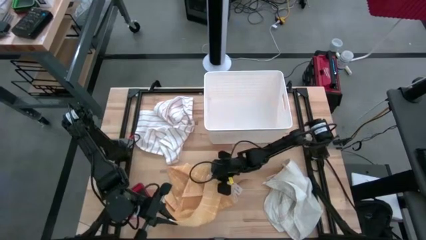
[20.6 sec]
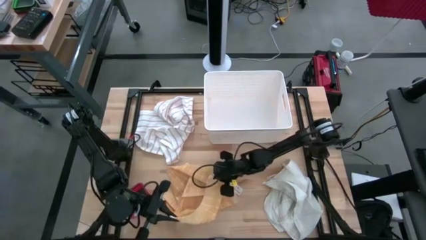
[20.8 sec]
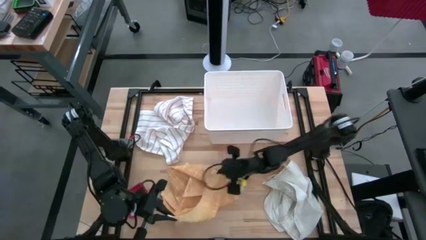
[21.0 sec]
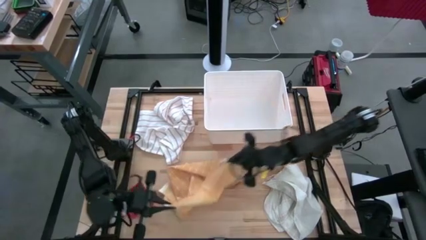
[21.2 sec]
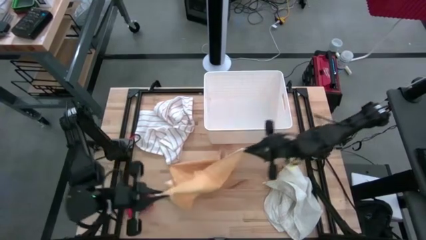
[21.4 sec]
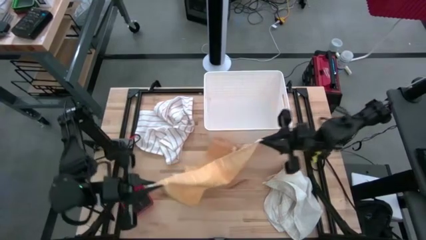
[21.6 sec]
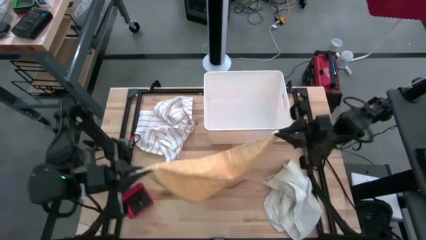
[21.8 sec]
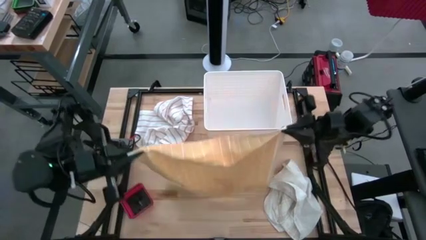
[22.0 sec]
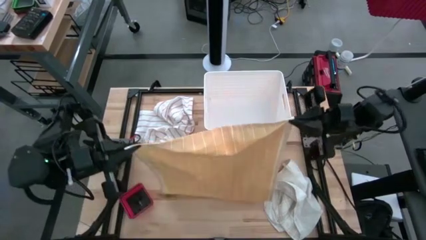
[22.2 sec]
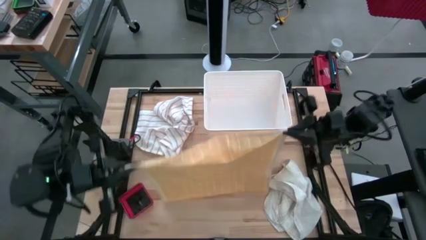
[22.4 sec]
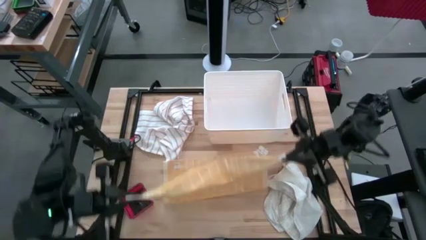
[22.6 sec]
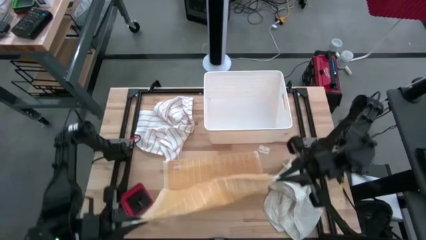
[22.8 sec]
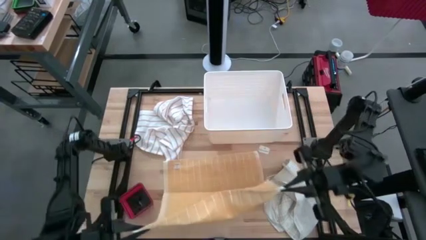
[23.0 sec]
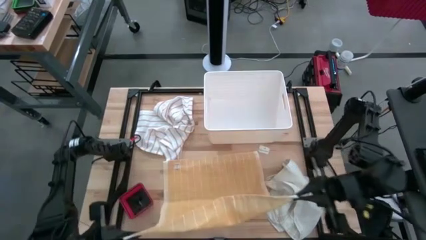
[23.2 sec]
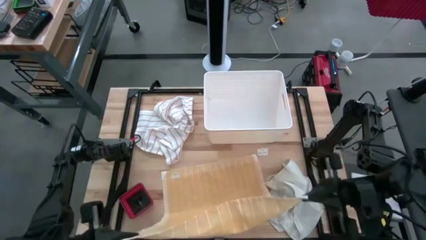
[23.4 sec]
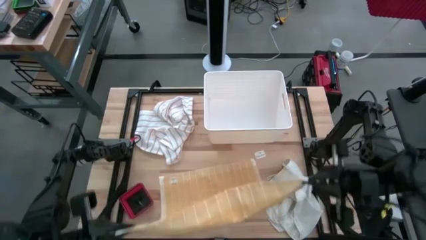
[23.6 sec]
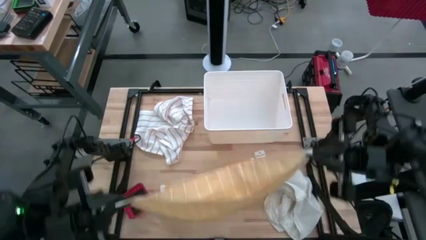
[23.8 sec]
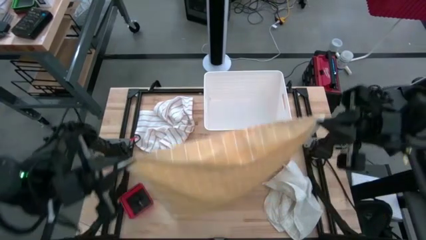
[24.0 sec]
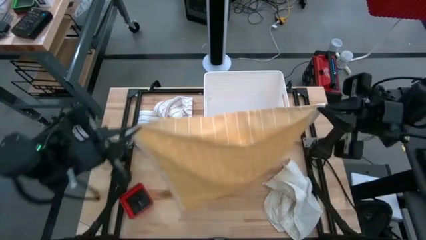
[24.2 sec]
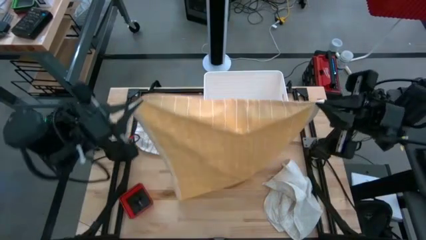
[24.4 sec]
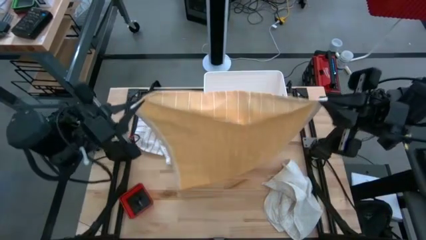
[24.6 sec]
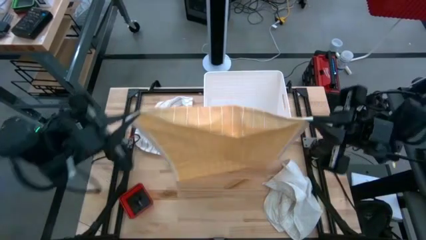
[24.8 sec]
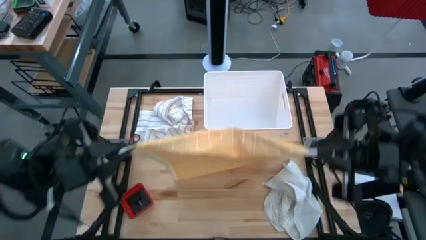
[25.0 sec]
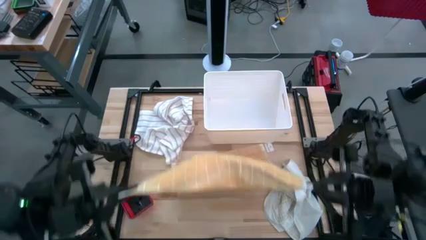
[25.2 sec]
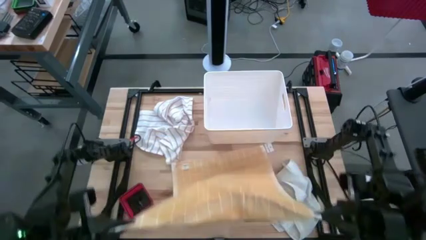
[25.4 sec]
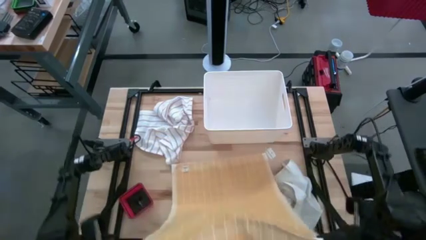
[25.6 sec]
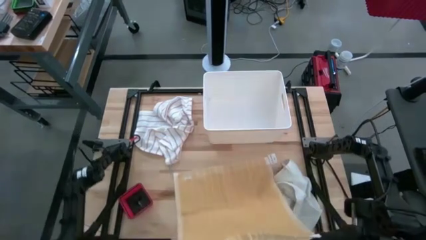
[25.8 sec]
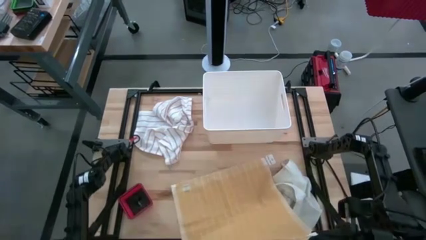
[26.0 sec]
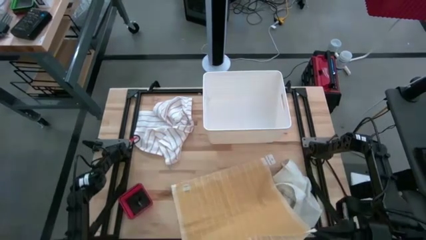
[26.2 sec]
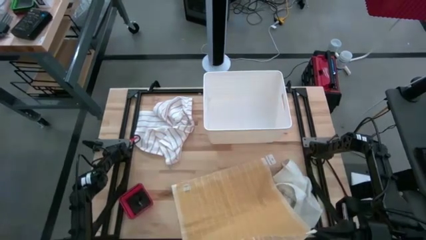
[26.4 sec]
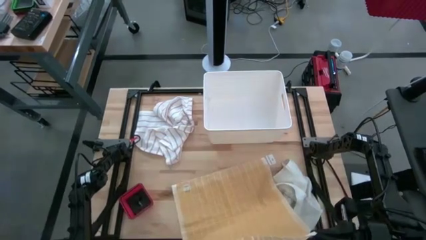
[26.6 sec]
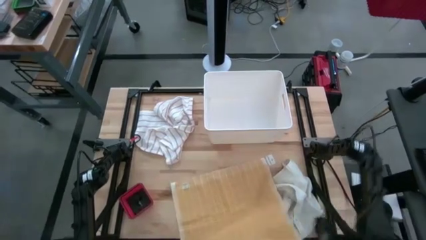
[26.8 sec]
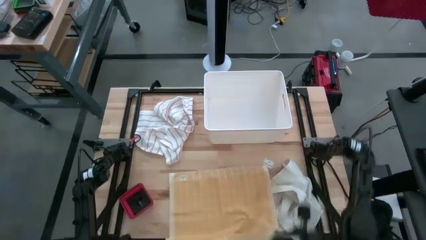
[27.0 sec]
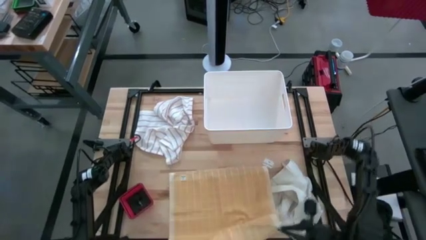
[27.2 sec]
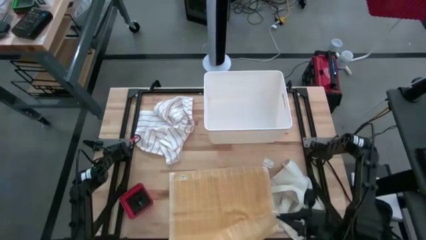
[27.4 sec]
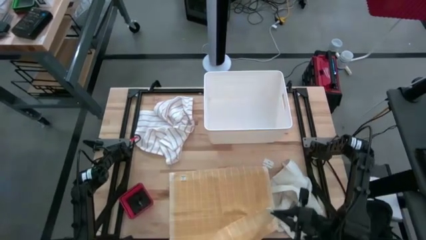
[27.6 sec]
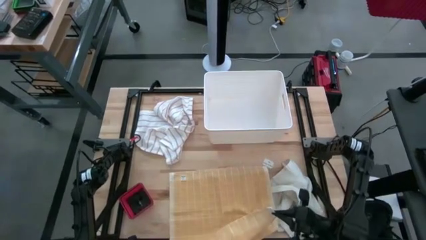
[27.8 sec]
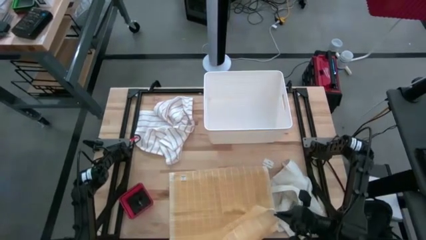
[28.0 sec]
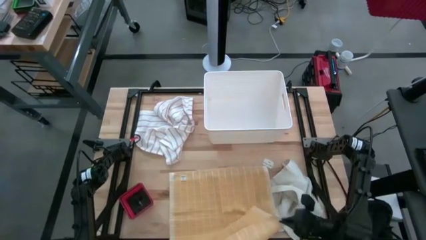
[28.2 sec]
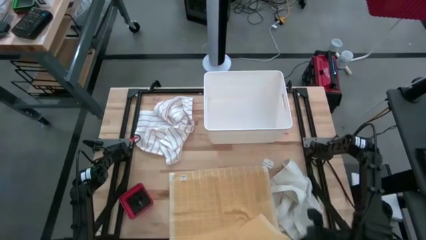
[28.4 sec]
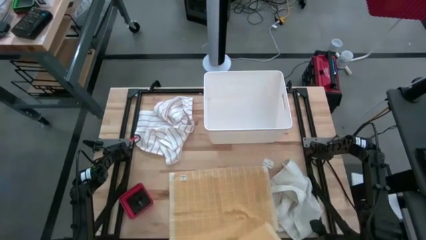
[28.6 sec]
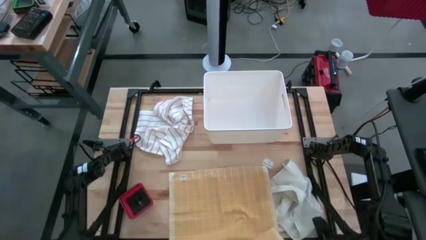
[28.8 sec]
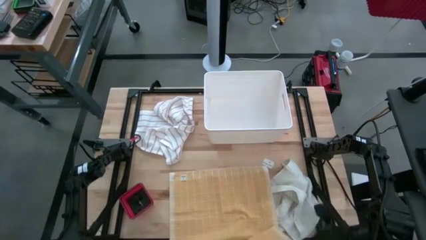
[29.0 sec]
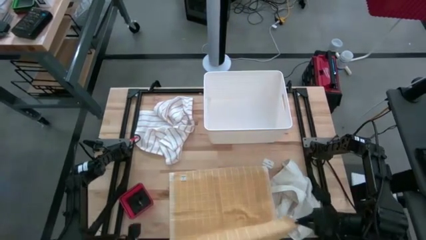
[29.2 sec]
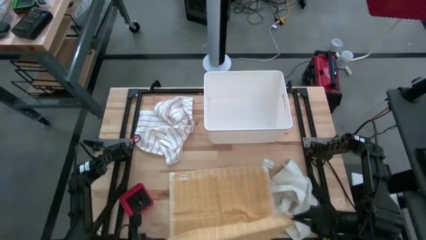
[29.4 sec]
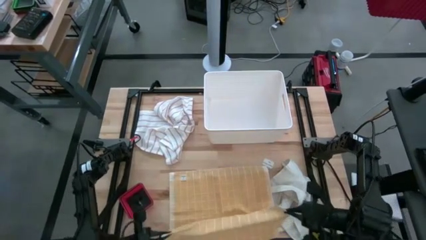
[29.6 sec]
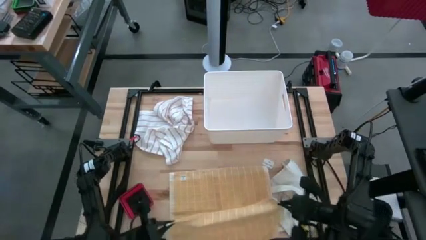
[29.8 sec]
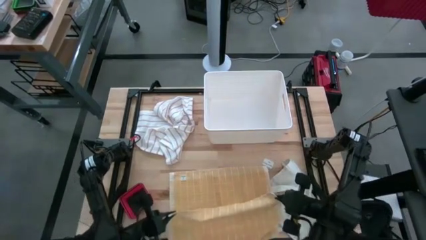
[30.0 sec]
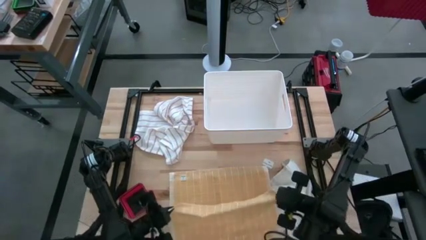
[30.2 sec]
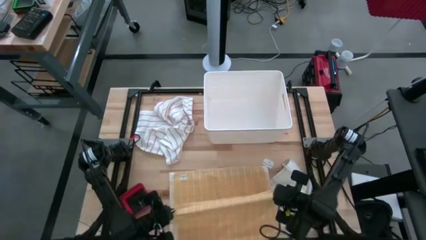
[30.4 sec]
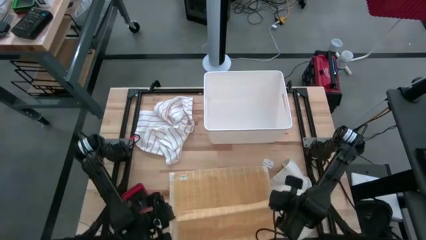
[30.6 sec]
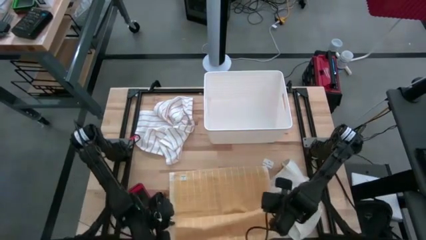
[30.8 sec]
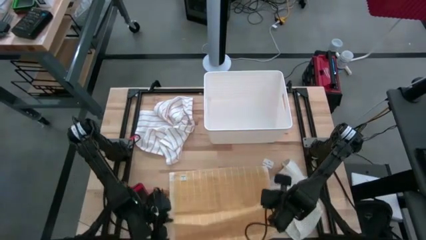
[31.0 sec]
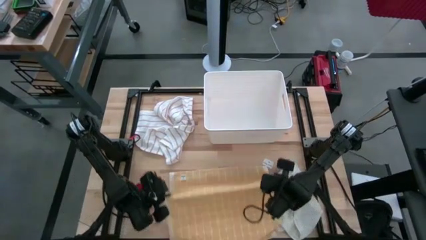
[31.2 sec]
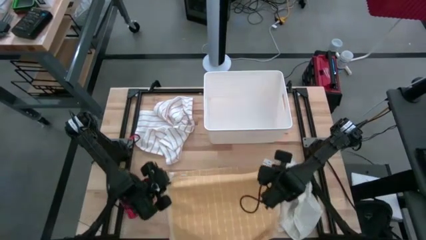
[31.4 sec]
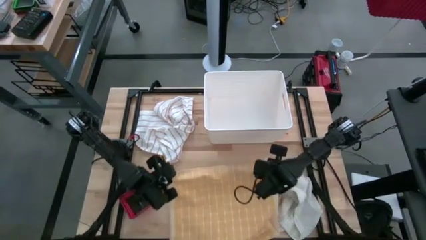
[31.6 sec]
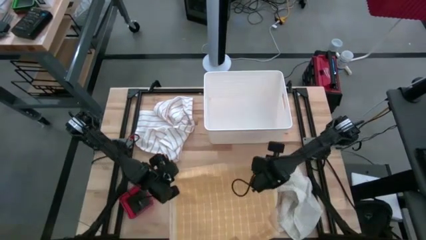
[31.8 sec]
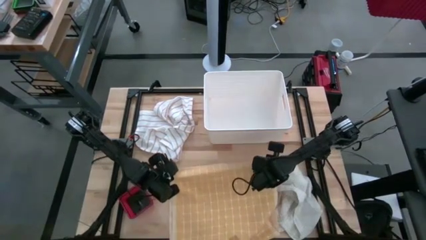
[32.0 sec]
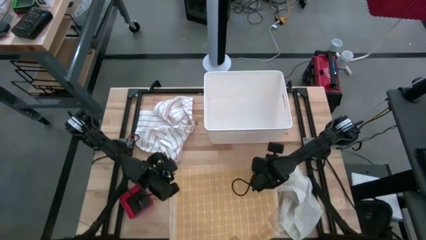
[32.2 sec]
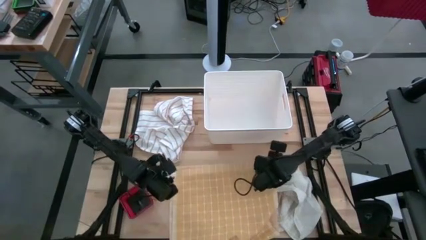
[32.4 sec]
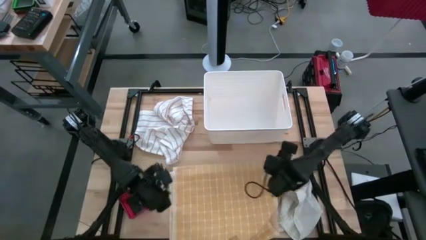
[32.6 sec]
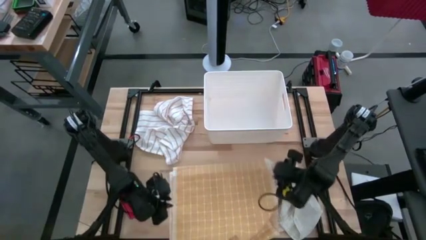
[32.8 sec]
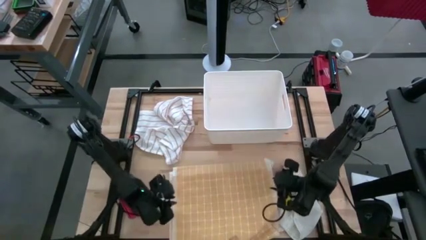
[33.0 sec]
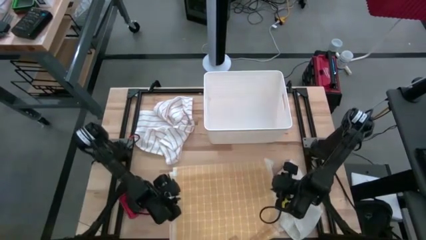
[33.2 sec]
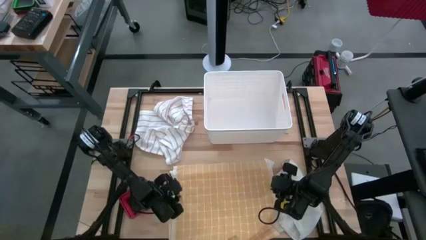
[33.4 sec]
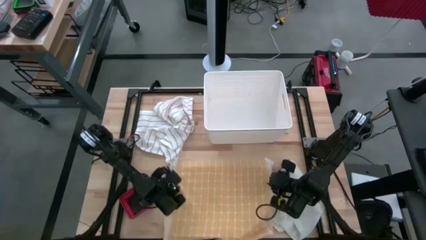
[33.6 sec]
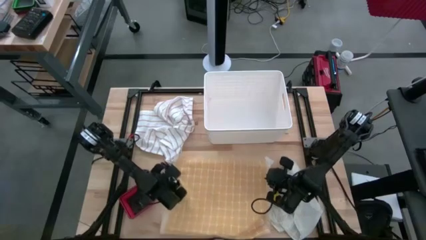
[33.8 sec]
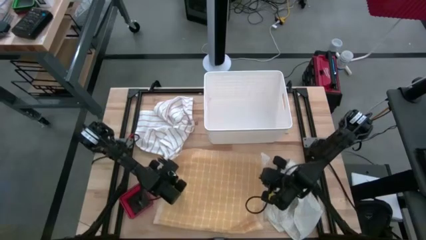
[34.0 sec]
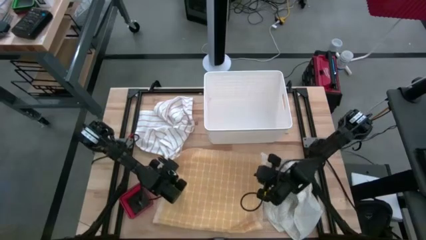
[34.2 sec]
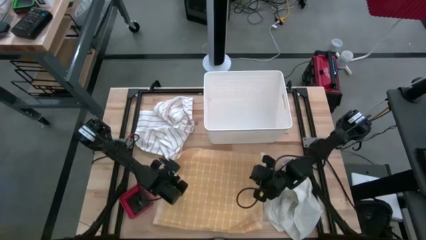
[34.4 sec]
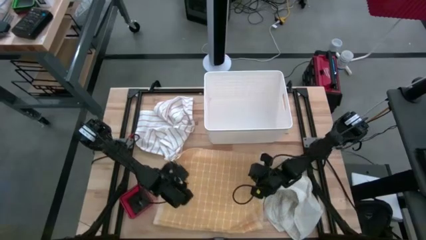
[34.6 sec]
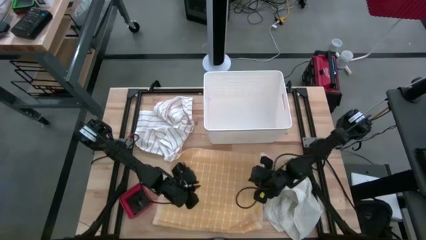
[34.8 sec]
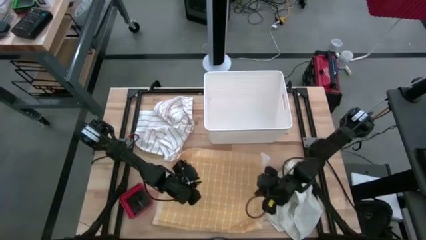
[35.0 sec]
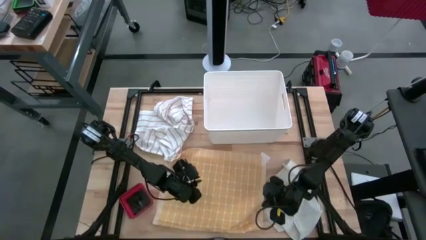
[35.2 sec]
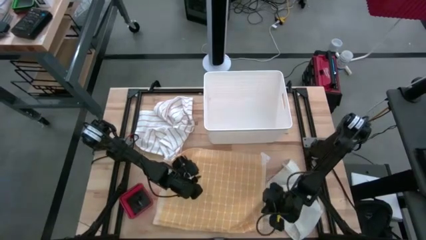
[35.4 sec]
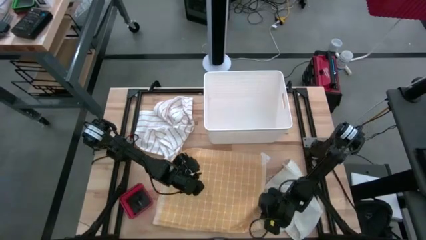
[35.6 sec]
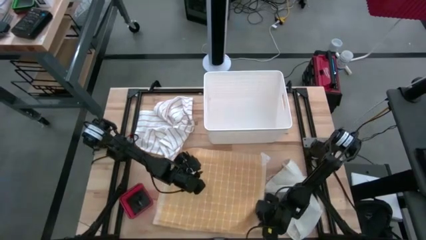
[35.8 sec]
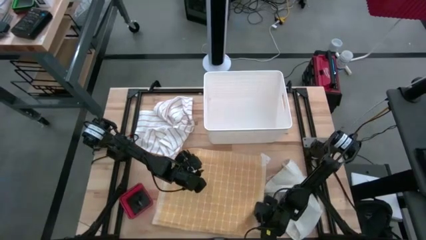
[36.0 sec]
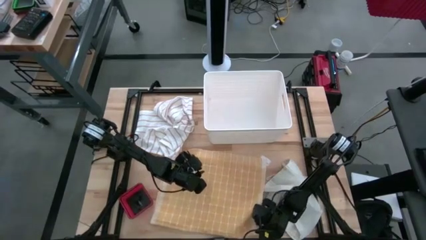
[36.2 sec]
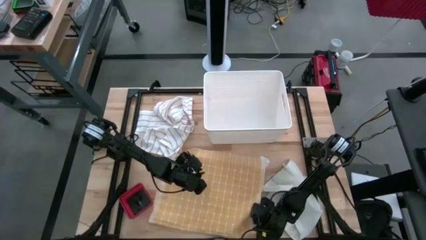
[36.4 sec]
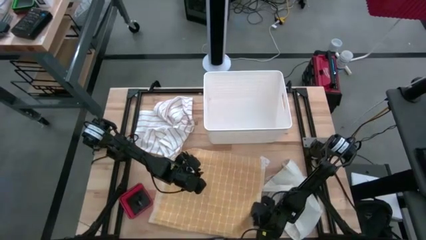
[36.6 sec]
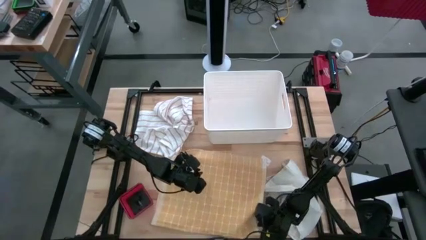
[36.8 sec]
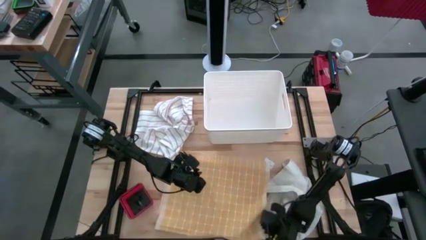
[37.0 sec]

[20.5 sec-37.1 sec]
Task: Fold towel
Fold the yellow towel
